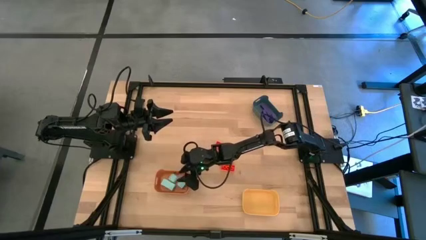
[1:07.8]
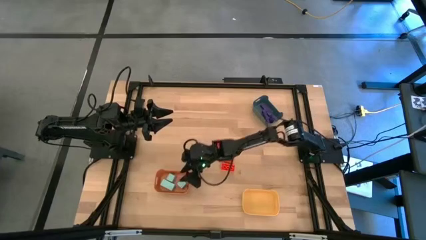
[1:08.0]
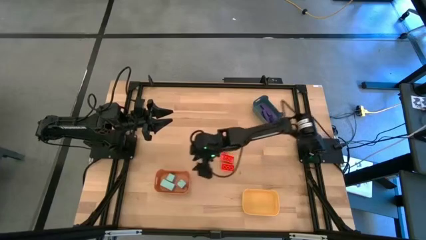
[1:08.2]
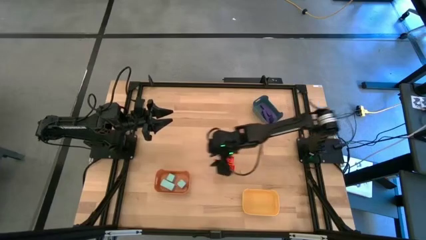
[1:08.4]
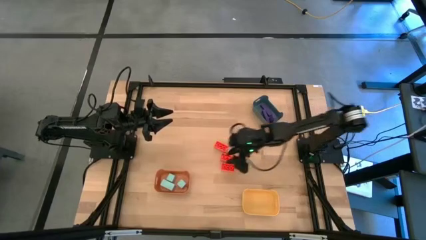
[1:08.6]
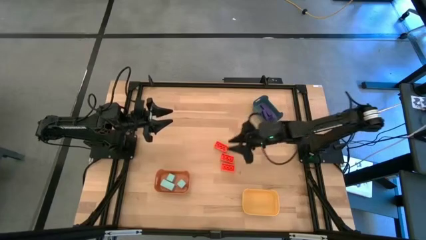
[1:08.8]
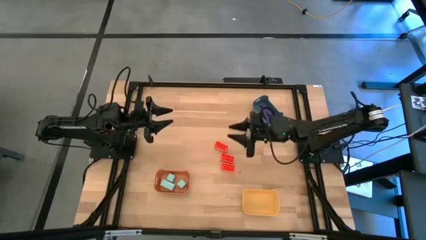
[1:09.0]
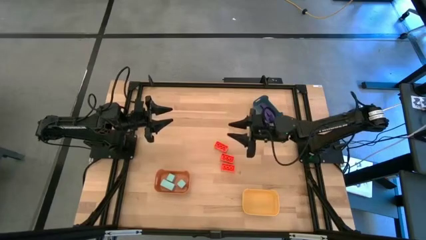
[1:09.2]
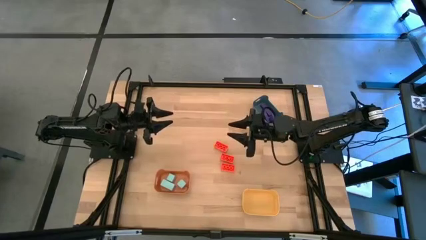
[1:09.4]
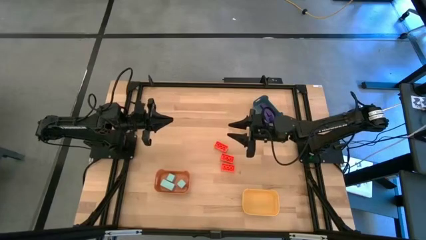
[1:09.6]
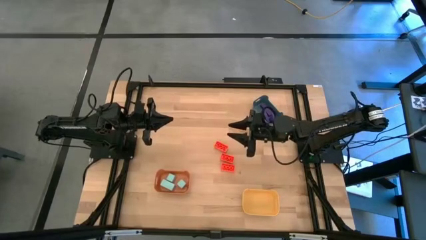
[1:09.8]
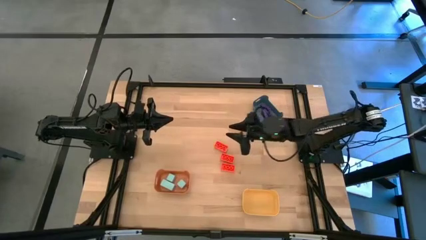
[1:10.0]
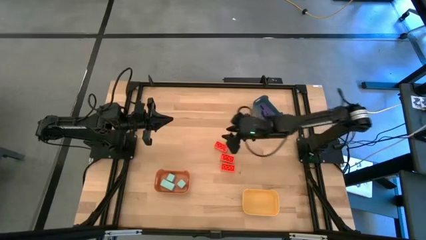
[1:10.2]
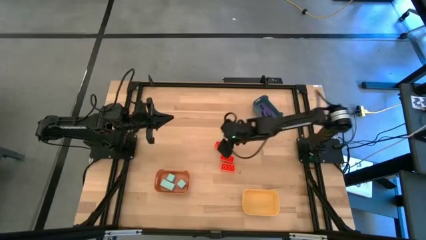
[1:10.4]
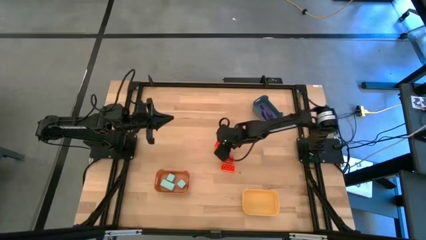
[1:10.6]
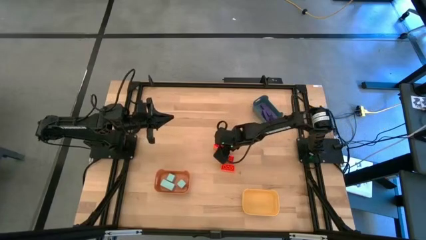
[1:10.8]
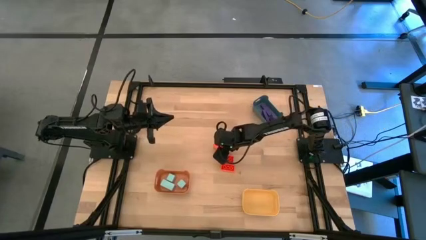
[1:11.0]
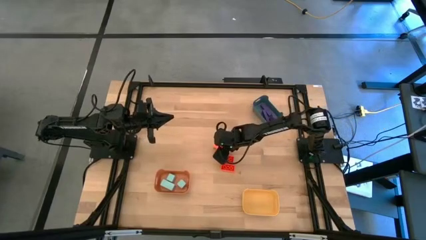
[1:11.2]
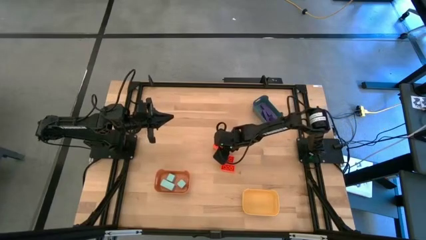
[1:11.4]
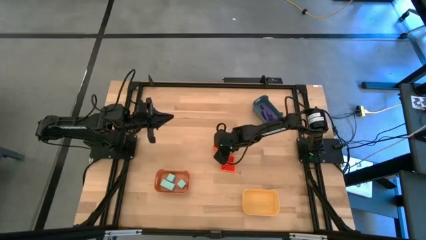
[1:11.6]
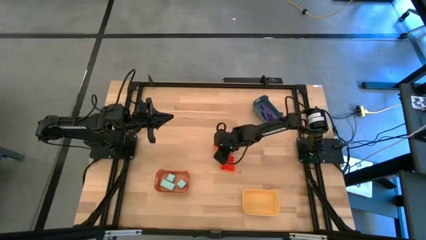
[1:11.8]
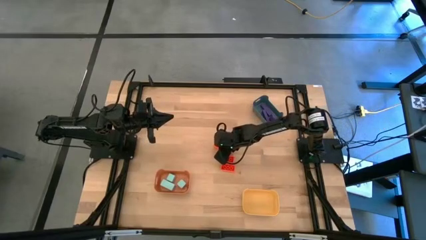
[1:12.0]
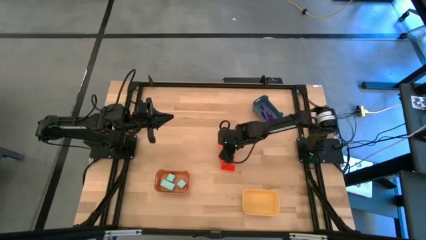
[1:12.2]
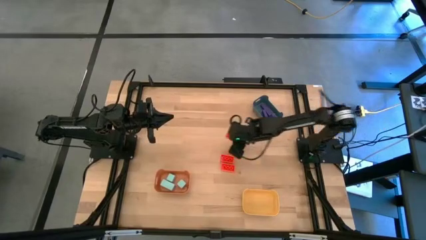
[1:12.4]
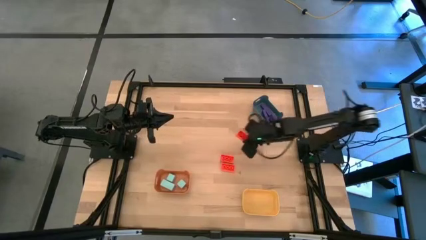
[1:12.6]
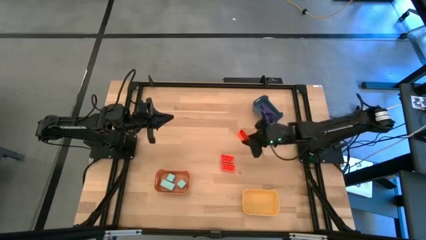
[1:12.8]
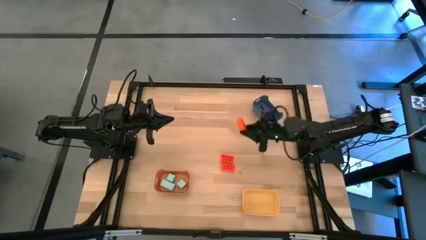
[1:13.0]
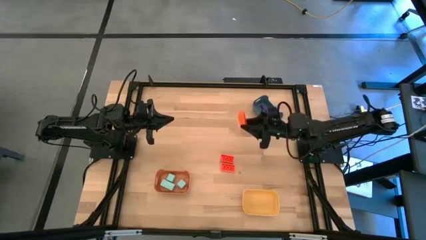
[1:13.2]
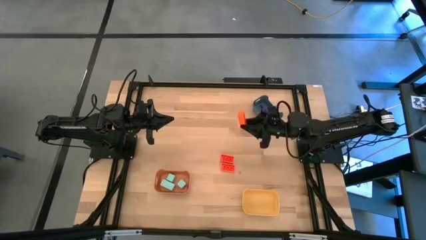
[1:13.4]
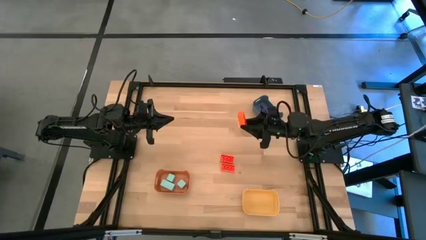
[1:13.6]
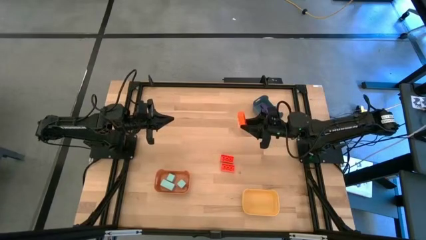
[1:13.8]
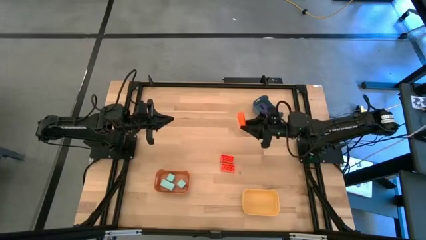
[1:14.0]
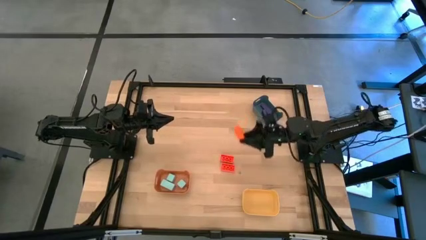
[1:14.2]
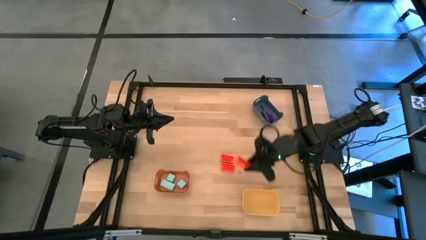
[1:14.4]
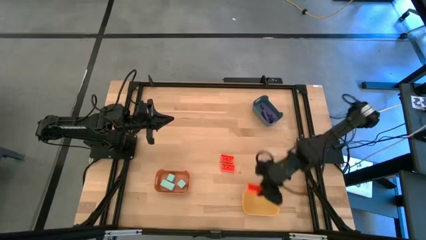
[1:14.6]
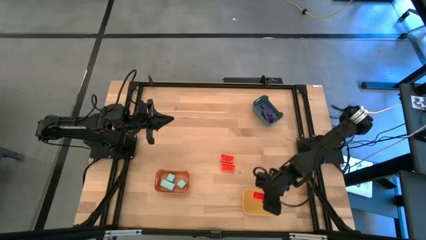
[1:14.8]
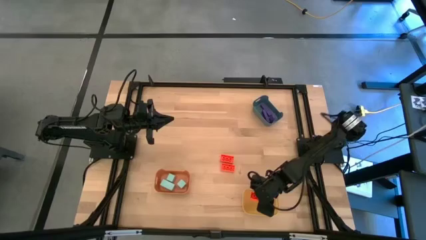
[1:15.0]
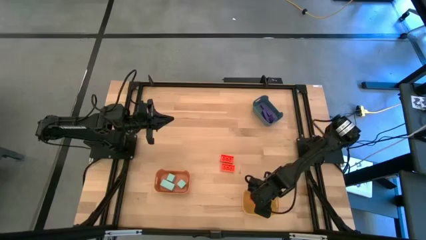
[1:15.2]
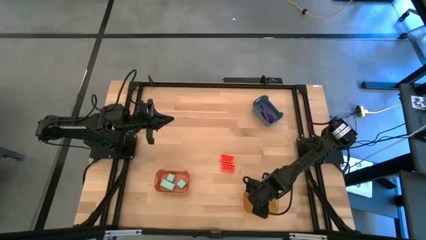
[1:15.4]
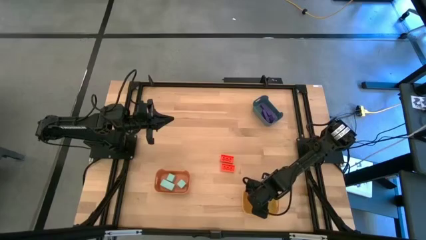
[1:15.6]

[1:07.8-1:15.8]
Task: Sort & place blocks by color
Put the top orange game piece into the yellow bin

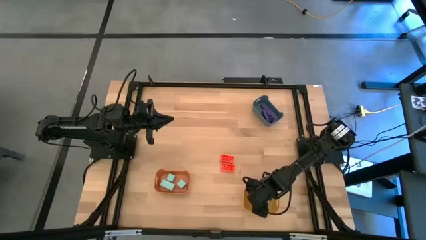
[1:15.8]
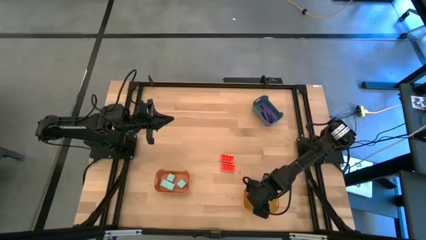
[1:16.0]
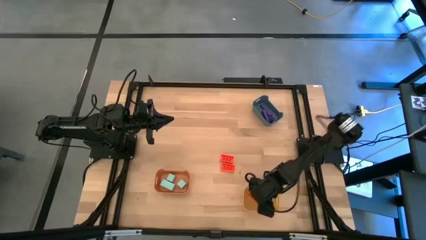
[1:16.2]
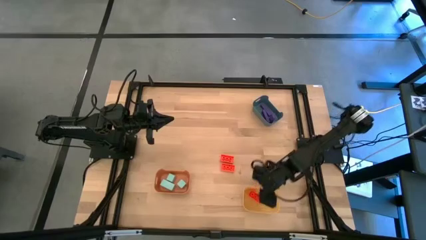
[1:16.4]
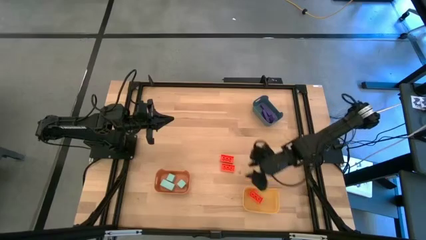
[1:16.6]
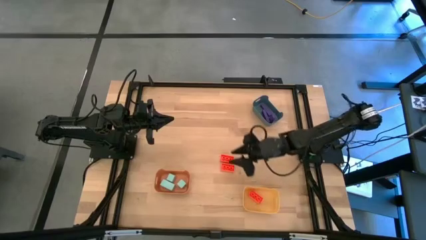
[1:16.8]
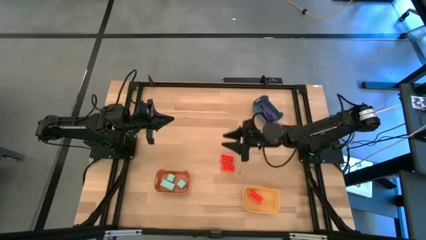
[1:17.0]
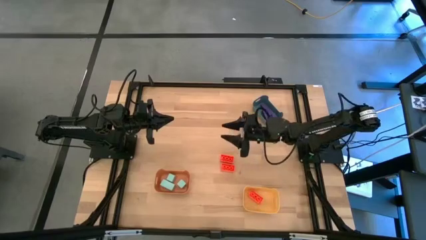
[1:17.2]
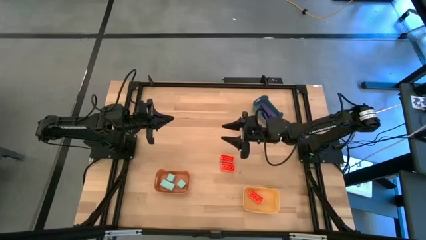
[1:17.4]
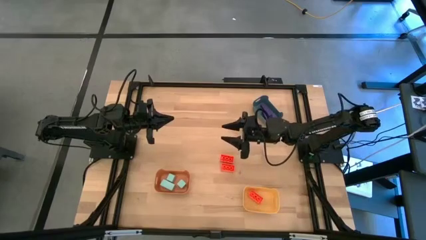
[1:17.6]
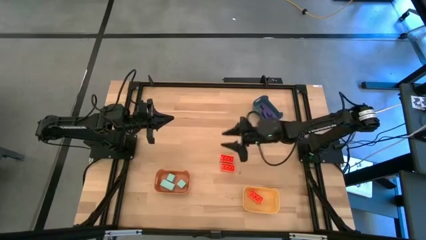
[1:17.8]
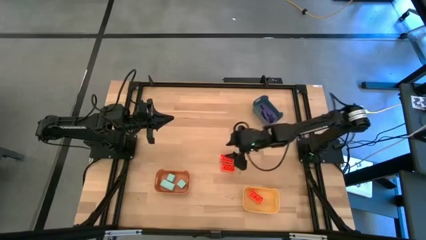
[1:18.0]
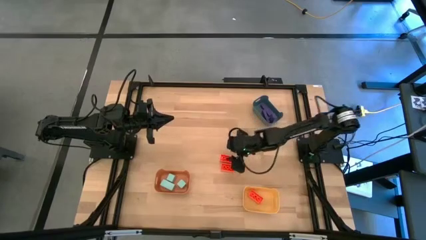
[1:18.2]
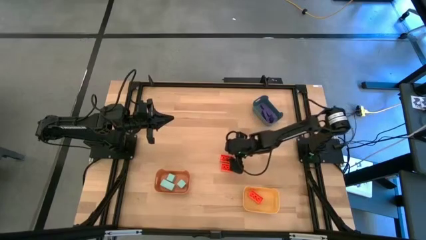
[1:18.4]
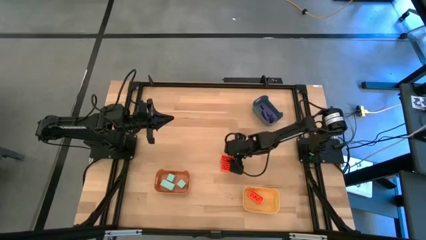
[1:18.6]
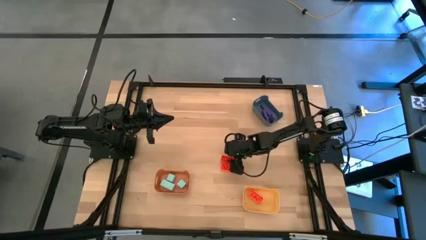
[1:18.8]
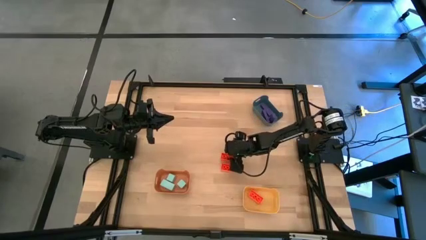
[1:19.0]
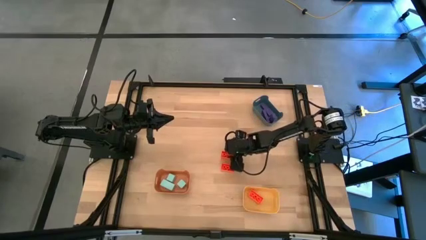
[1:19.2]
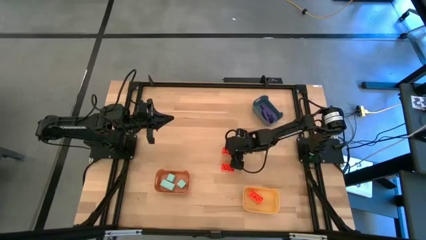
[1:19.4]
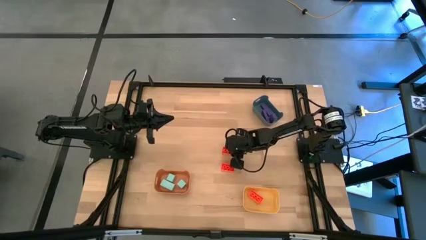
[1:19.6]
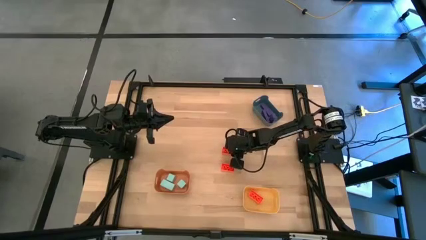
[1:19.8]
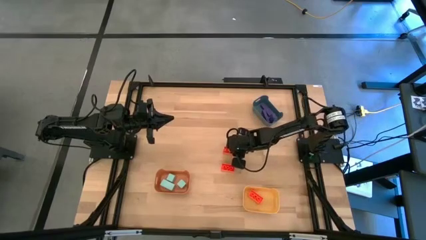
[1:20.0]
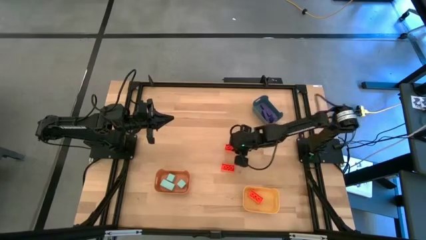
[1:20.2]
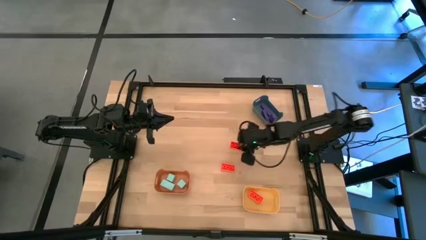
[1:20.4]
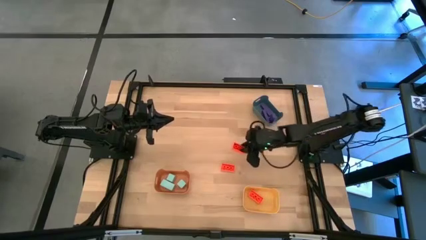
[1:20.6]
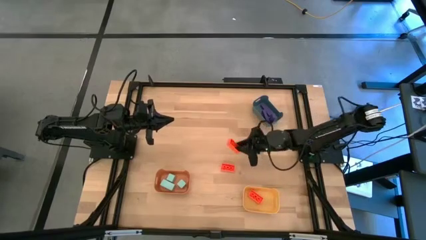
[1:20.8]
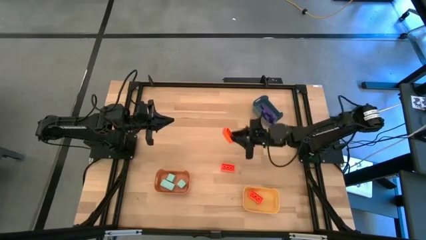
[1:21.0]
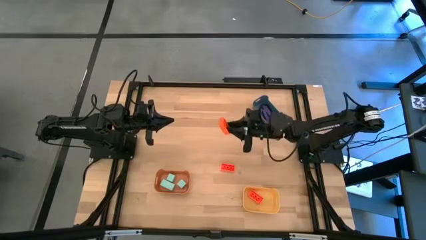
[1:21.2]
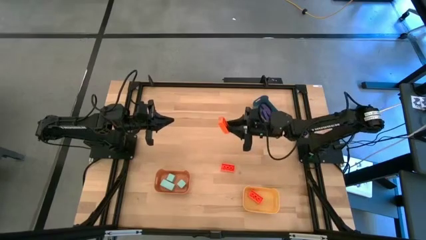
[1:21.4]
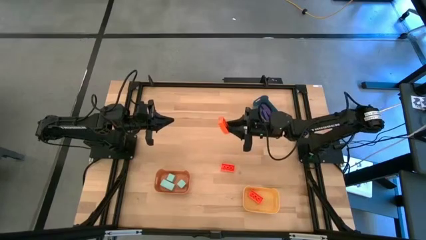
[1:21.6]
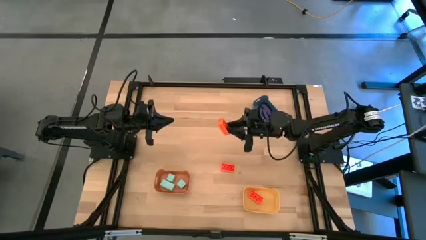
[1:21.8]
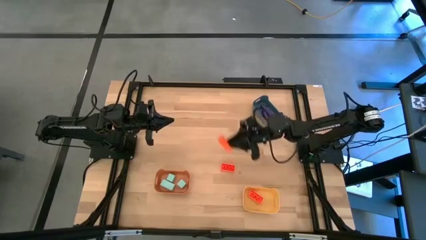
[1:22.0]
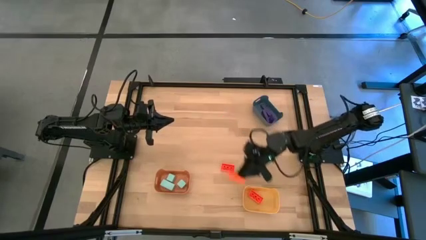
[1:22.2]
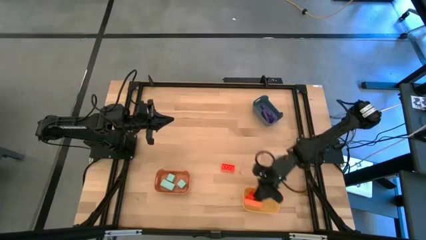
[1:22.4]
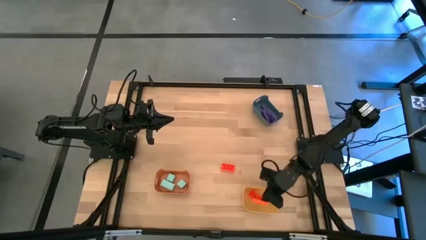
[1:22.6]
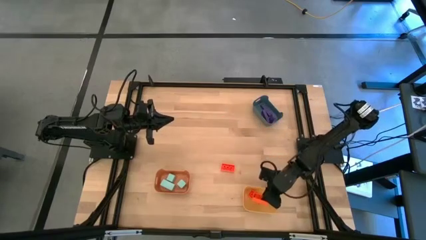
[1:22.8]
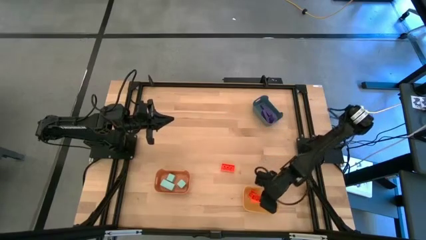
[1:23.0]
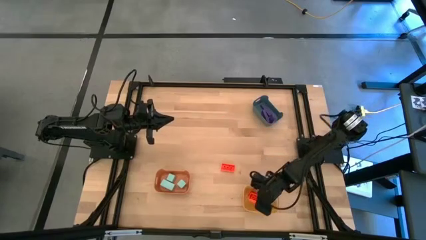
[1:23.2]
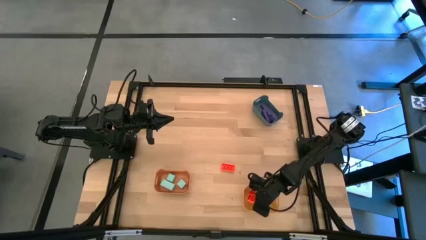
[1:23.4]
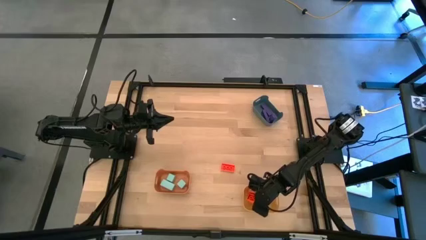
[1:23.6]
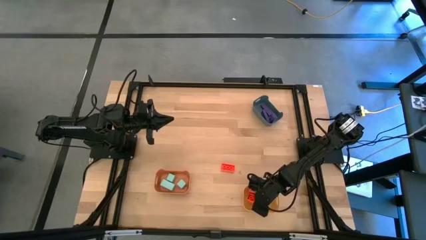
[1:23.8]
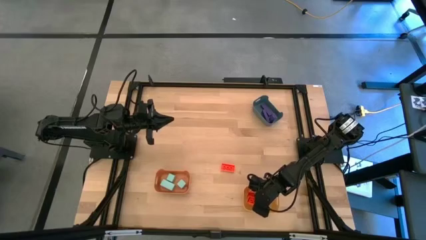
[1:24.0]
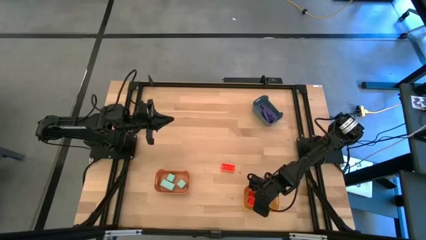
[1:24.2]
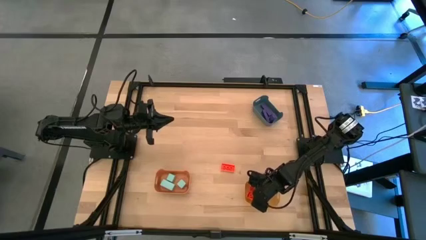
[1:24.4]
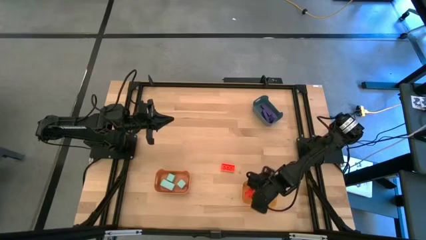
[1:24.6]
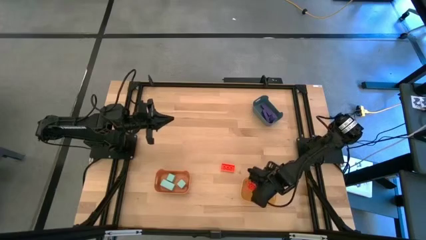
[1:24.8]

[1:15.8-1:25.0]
Put the top orange game piece into the yellow bin
